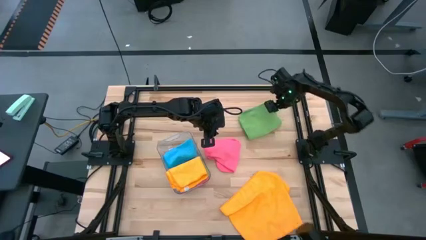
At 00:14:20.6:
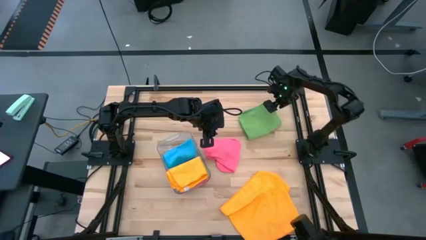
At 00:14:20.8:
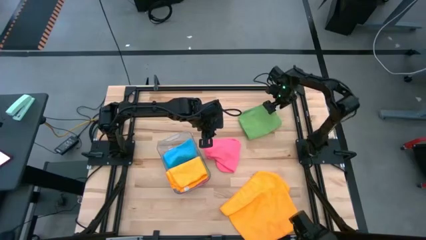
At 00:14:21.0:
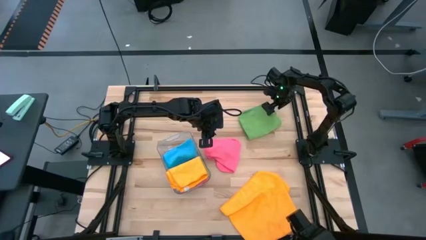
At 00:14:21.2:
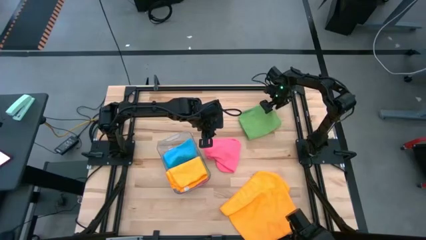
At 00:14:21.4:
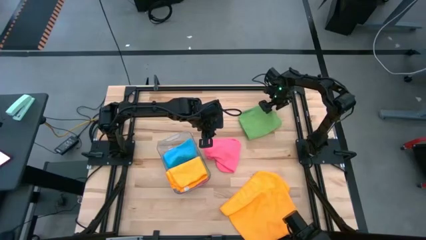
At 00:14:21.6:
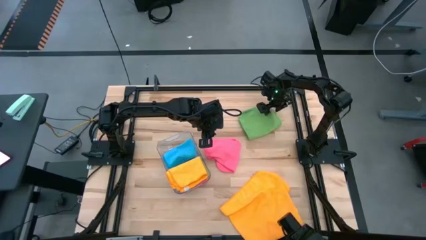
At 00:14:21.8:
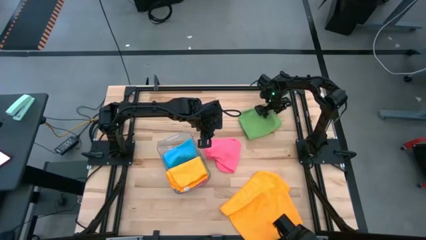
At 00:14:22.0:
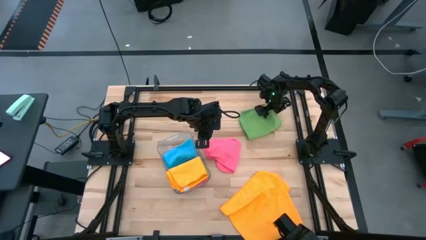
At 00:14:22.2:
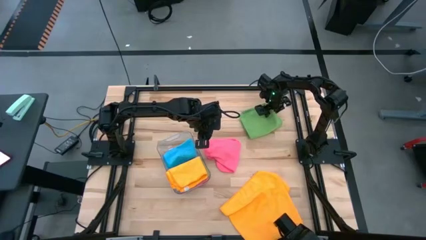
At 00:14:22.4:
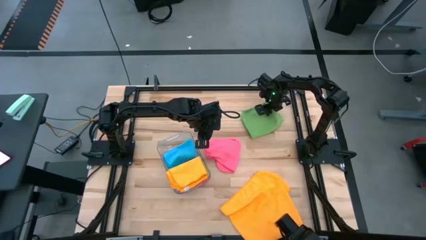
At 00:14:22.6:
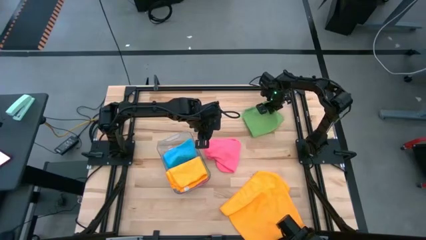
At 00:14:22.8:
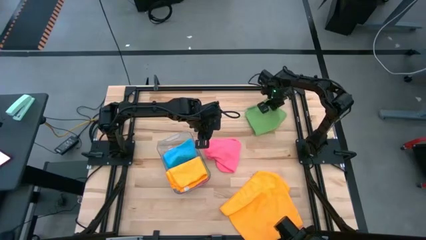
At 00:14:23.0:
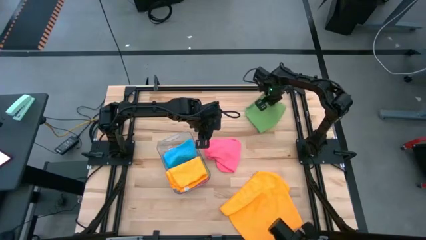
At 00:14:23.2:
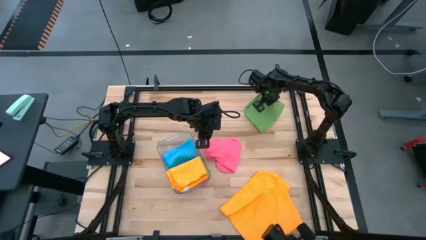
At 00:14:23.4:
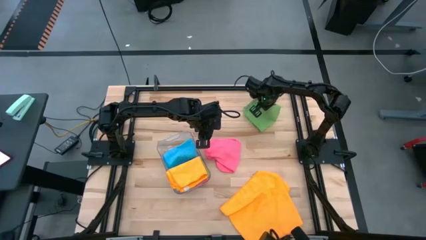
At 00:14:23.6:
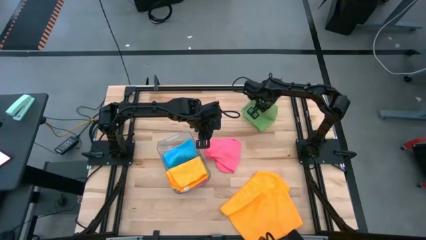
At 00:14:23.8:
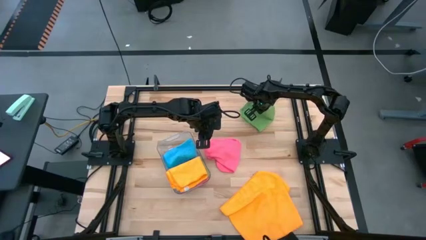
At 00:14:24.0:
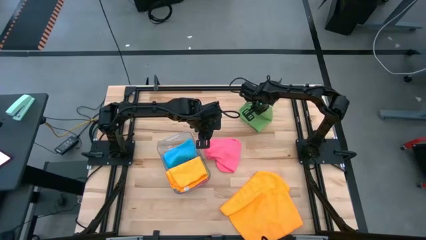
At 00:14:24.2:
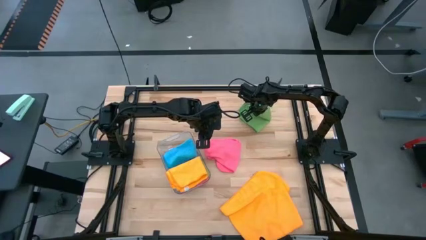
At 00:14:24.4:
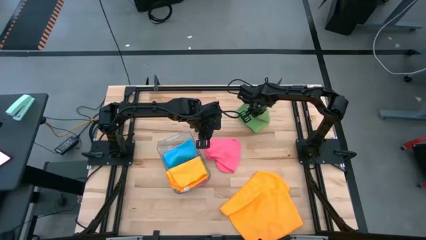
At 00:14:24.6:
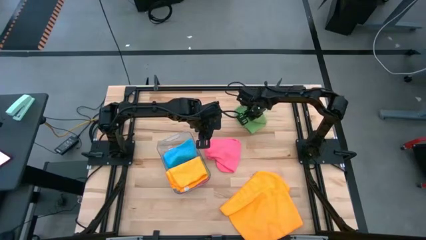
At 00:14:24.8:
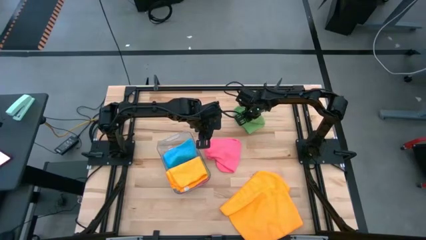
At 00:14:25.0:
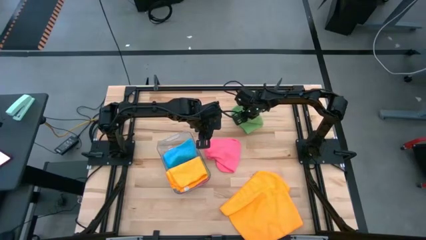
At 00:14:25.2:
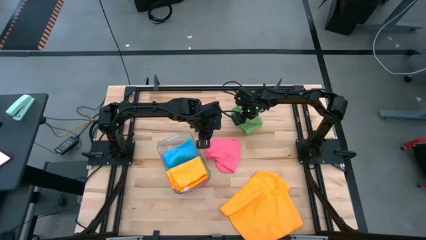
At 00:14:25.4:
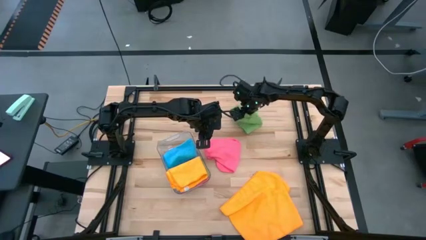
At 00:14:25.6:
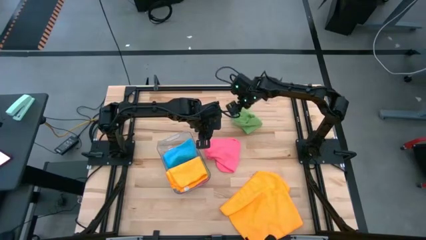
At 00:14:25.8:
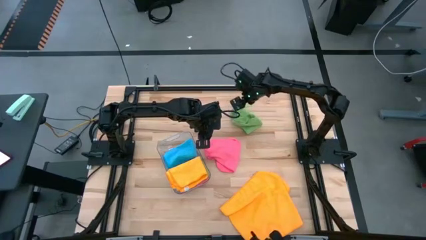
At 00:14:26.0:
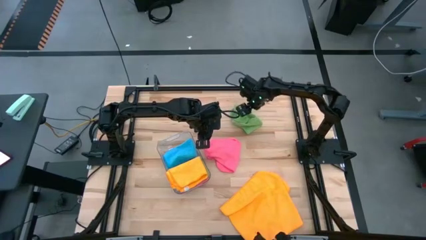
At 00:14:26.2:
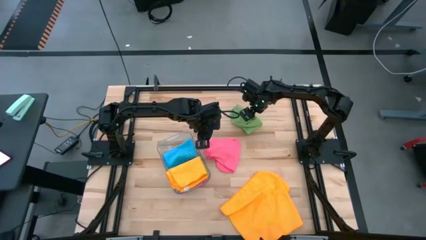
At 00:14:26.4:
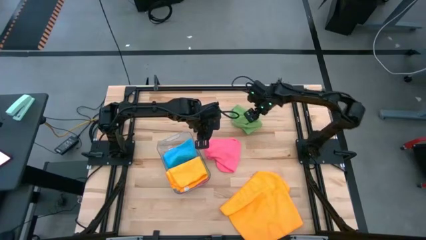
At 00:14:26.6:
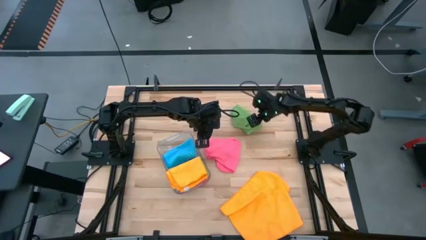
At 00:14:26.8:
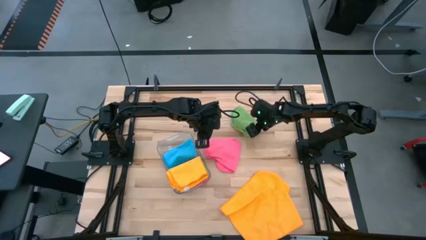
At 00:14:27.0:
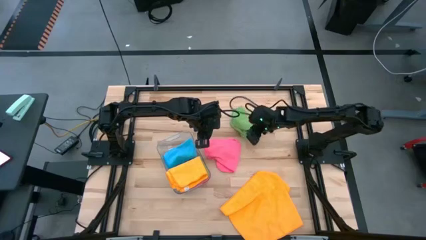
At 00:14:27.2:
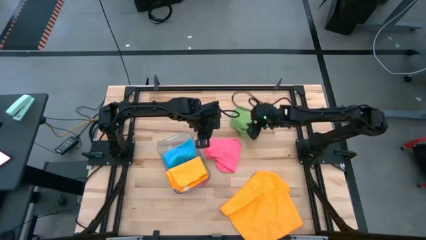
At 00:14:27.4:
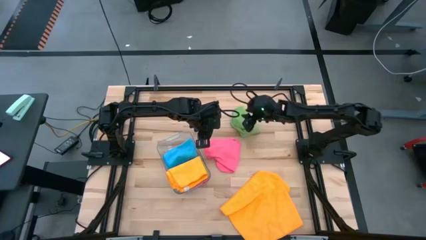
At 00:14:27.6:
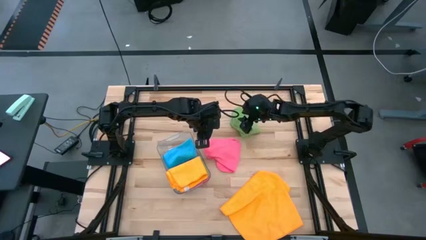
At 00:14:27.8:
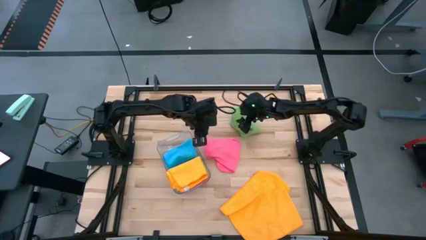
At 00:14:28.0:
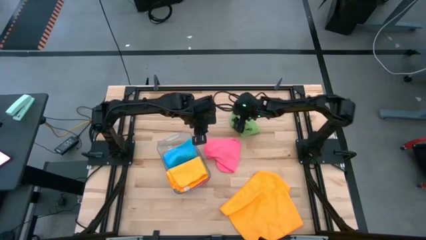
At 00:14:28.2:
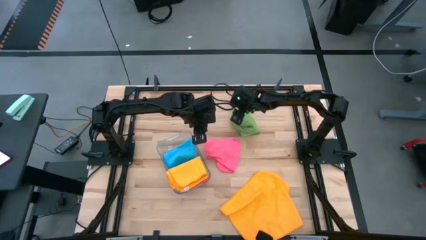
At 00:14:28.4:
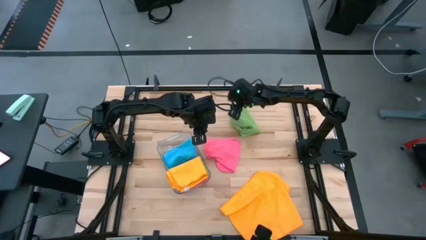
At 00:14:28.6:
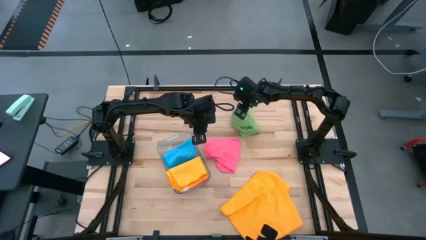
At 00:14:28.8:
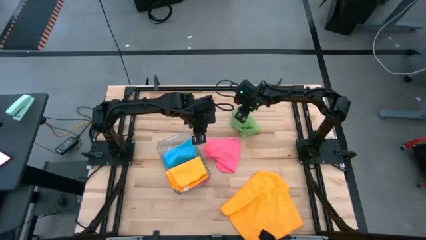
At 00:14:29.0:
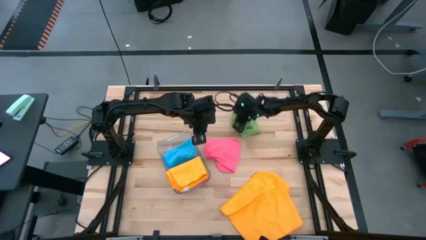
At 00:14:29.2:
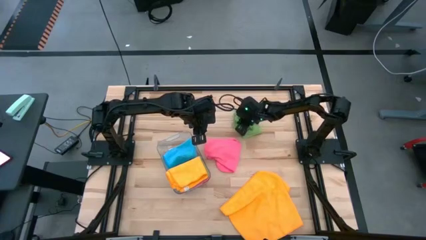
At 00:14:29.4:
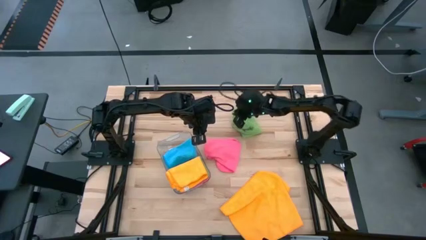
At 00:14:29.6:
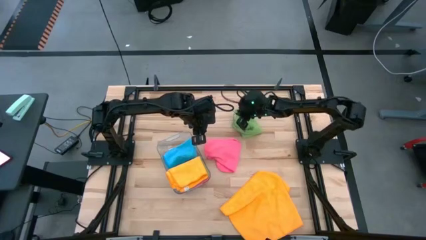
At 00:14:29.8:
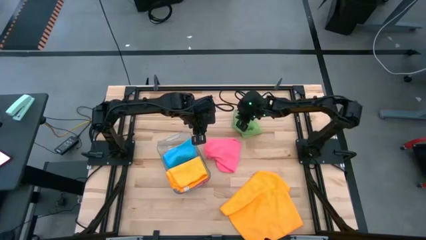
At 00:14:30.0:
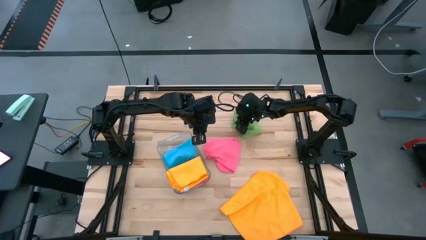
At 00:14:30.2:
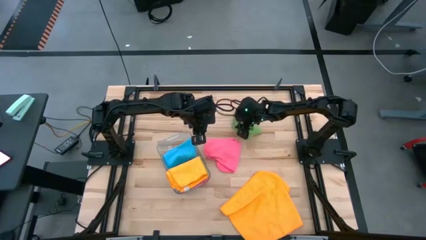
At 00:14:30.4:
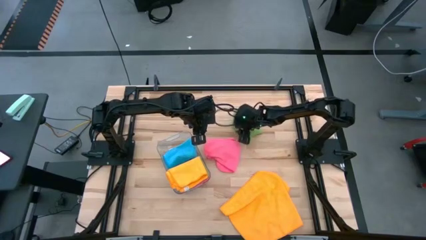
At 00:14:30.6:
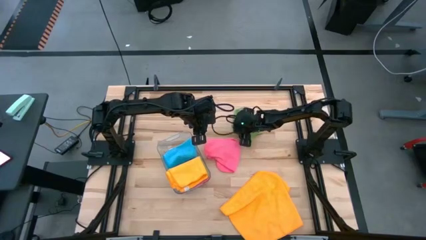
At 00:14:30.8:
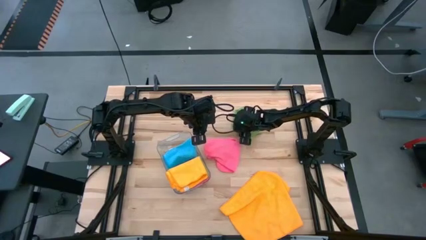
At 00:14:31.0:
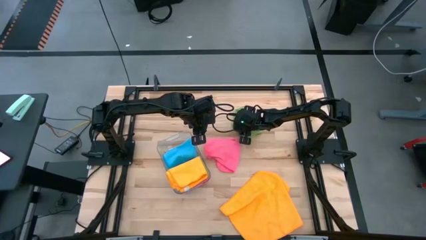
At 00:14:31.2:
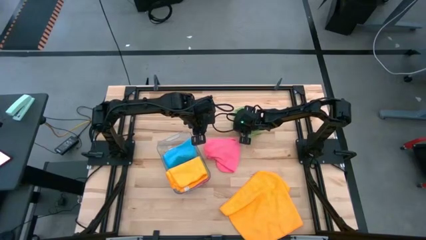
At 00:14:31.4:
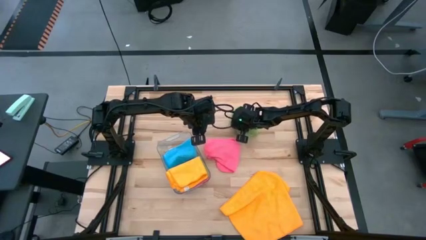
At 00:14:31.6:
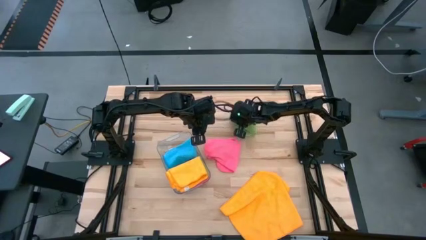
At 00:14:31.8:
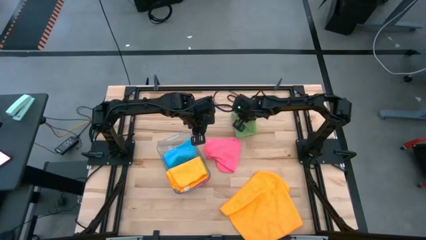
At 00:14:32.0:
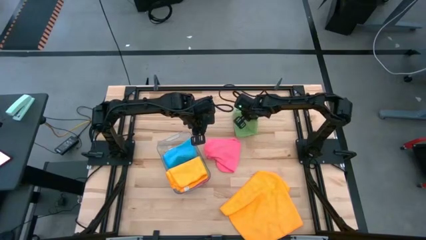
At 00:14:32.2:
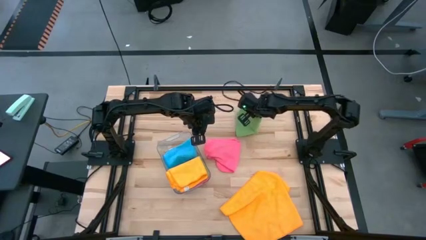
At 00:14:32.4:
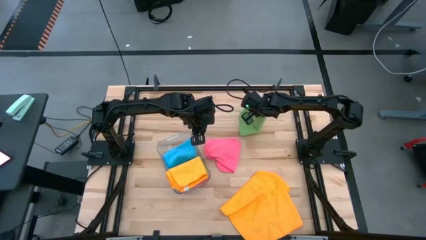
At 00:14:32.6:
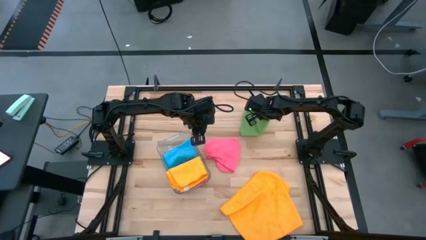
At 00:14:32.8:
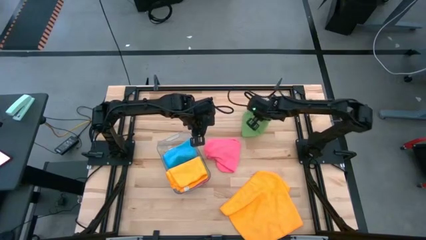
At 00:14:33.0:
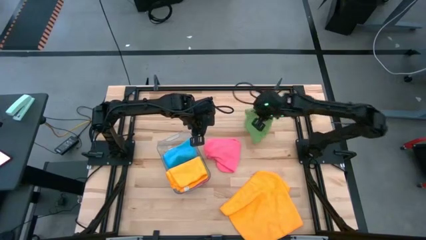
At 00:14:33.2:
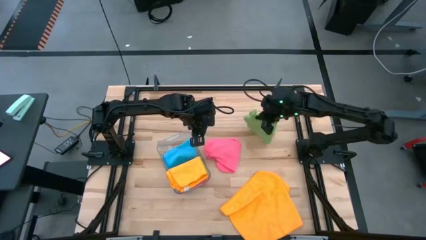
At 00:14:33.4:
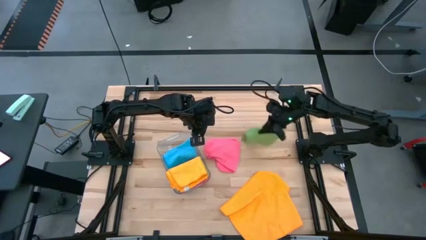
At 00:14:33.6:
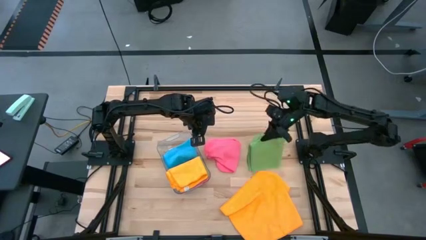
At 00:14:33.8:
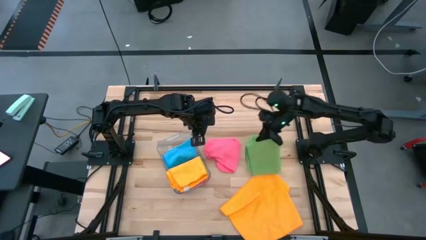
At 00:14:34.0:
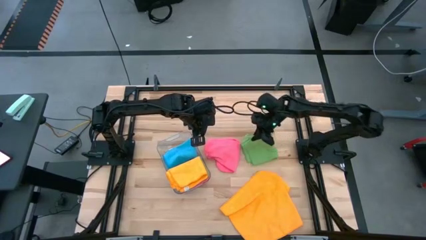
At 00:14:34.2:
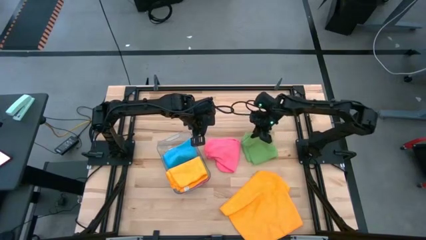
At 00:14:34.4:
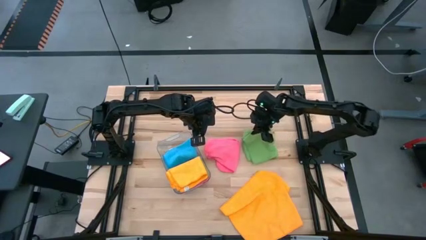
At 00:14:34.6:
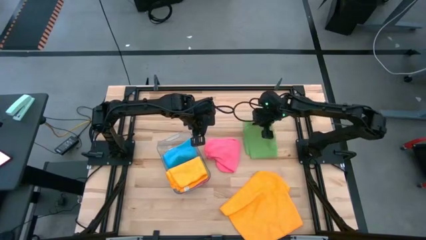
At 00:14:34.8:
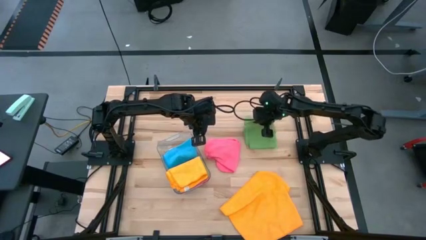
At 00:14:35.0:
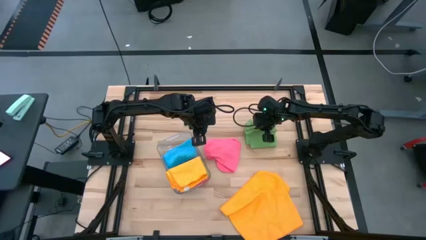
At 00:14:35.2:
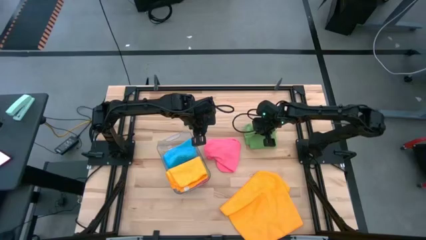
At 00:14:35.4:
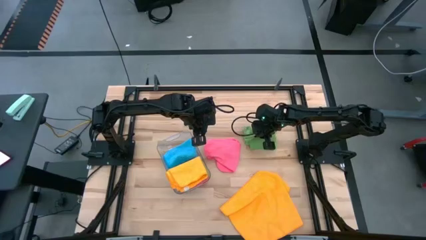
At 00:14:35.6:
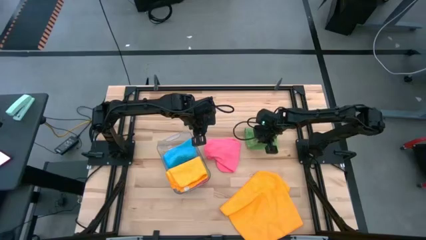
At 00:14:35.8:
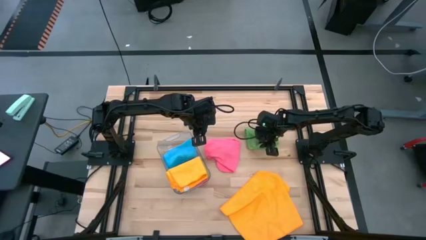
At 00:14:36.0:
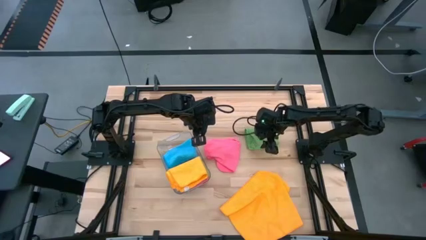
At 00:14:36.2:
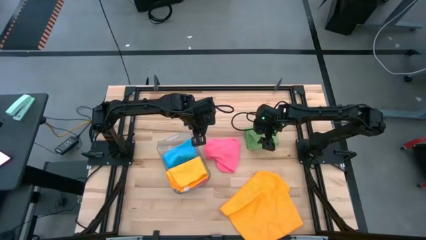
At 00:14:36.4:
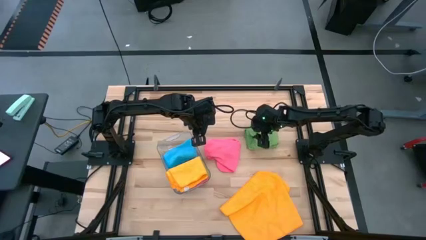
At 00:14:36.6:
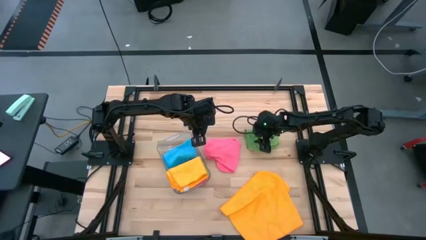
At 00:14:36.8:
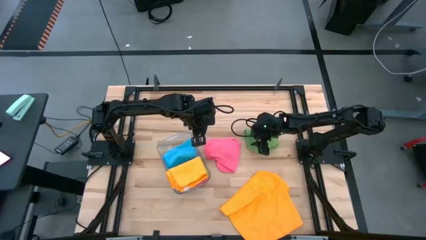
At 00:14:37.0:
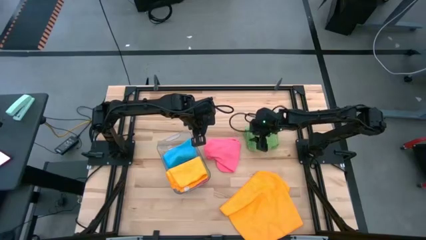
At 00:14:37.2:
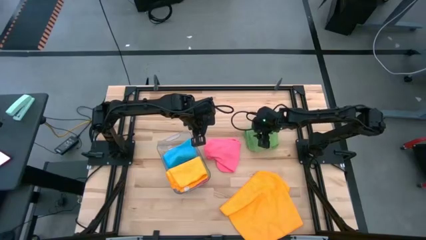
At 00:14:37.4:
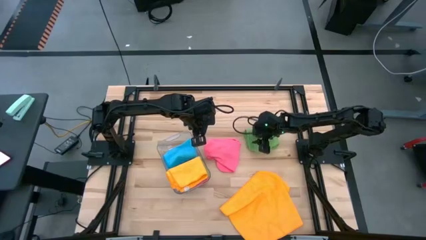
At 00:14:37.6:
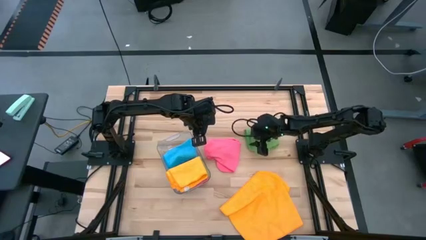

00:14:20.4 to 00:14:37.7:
Task: Fold microfiber towels
Fold the green towel
